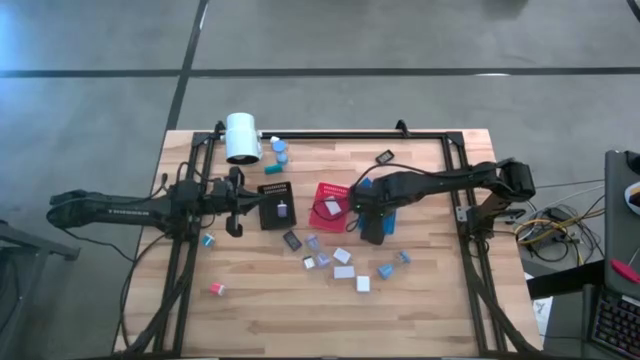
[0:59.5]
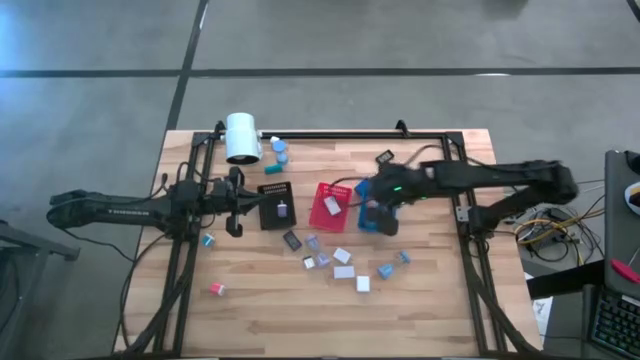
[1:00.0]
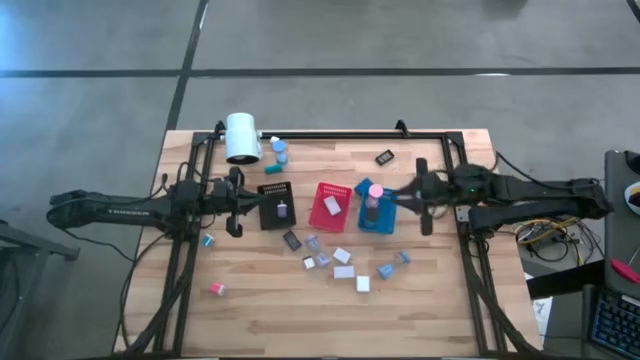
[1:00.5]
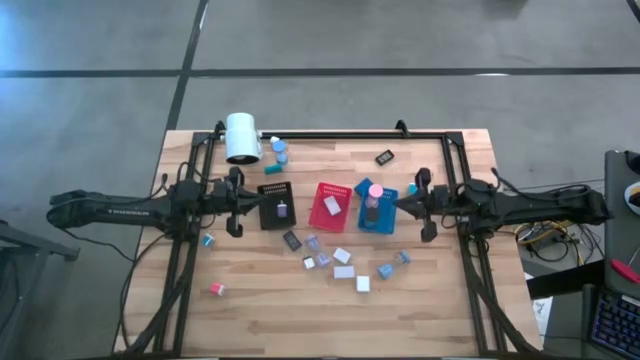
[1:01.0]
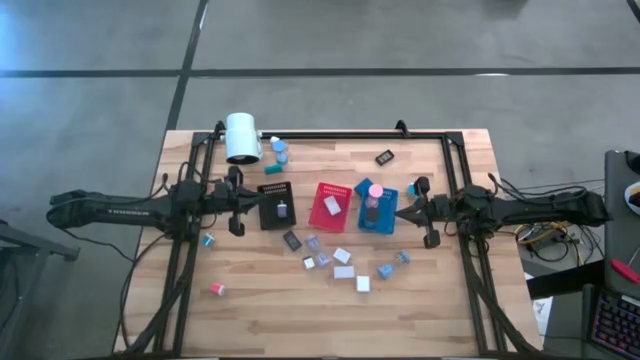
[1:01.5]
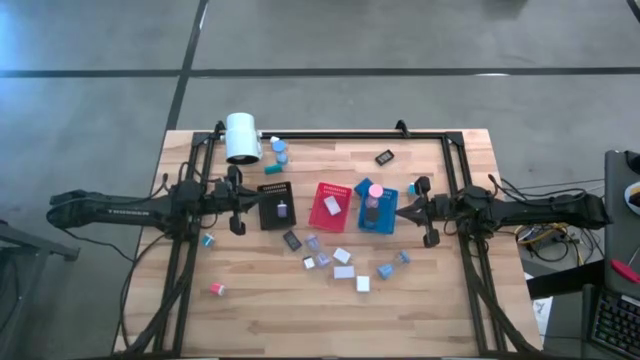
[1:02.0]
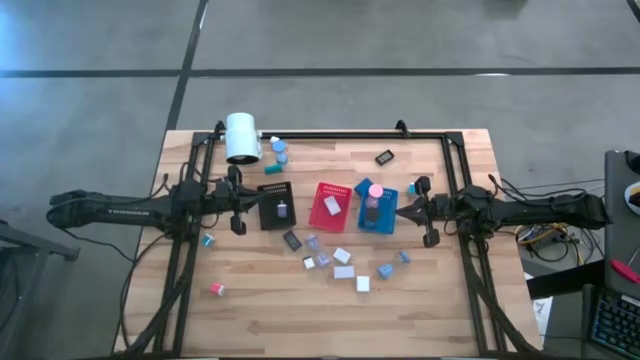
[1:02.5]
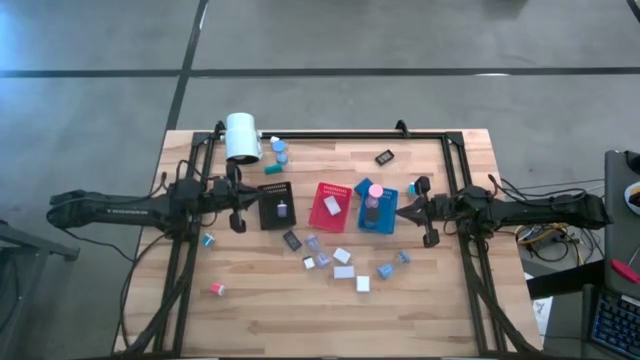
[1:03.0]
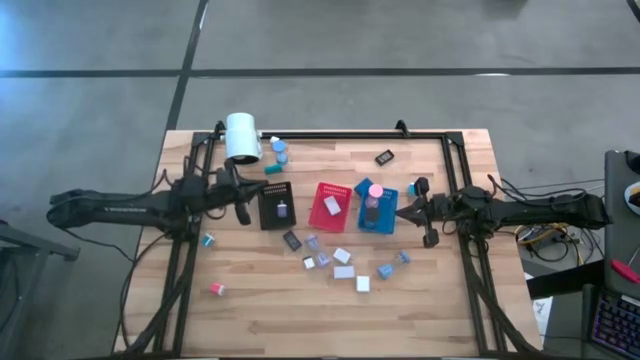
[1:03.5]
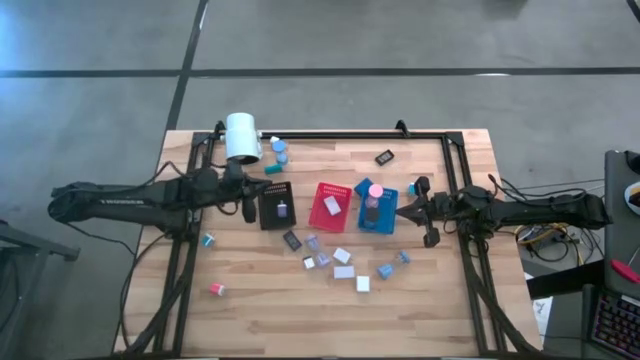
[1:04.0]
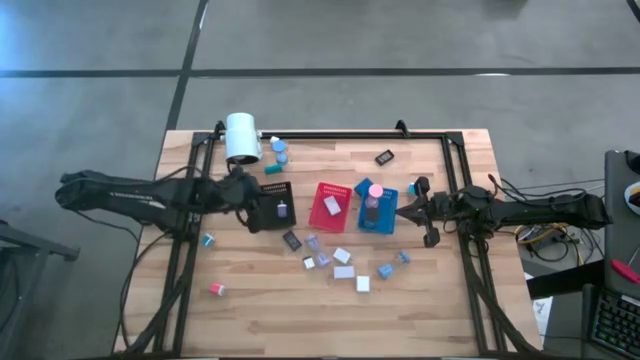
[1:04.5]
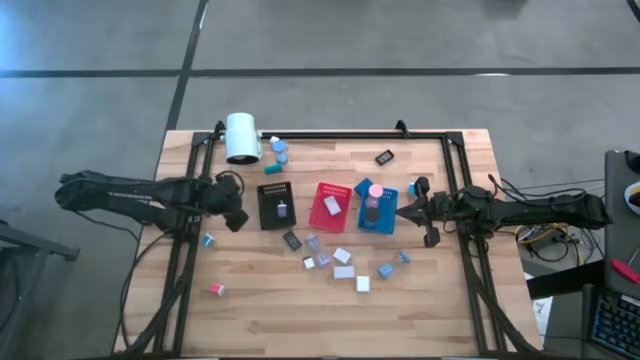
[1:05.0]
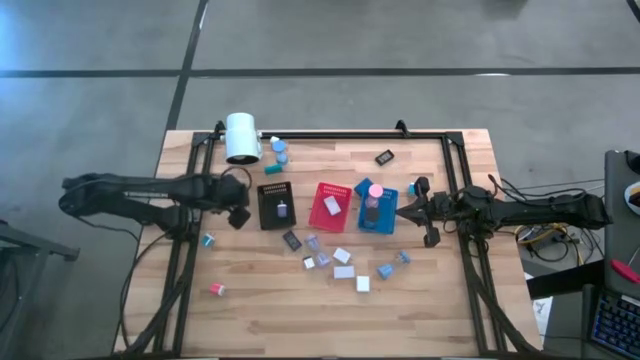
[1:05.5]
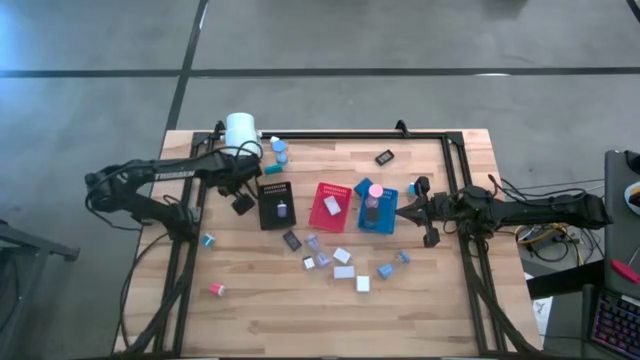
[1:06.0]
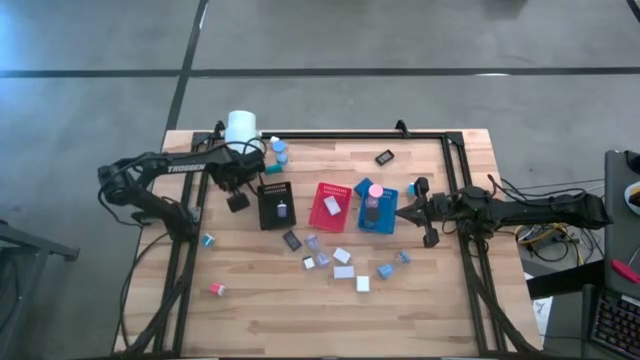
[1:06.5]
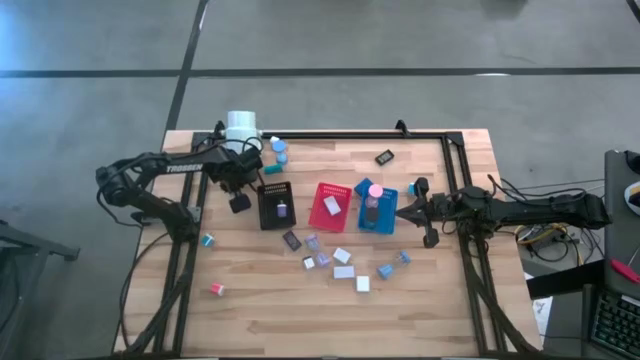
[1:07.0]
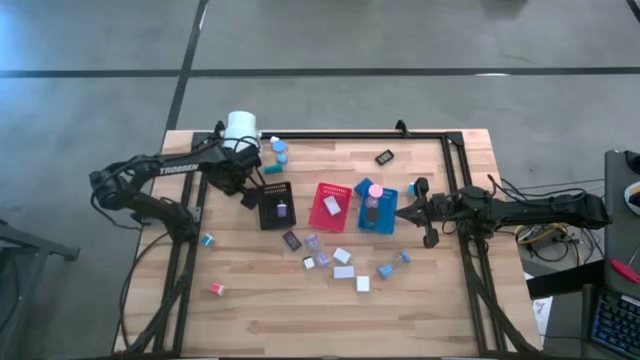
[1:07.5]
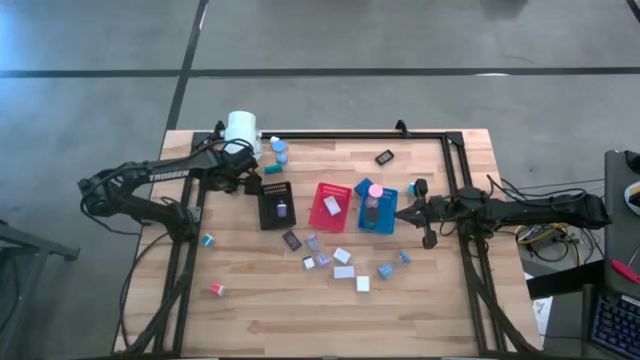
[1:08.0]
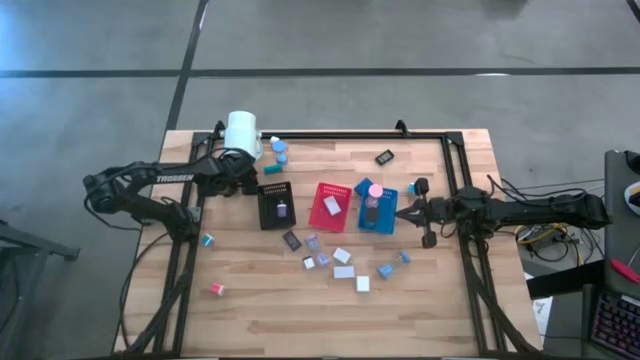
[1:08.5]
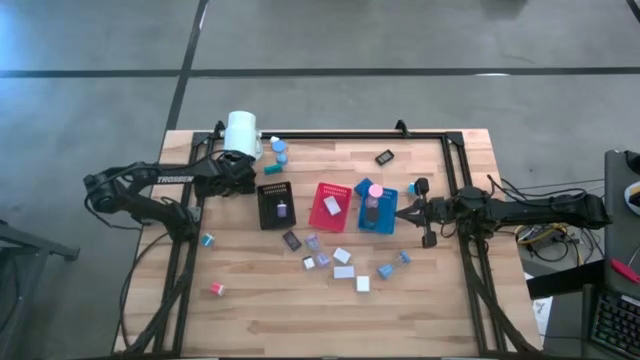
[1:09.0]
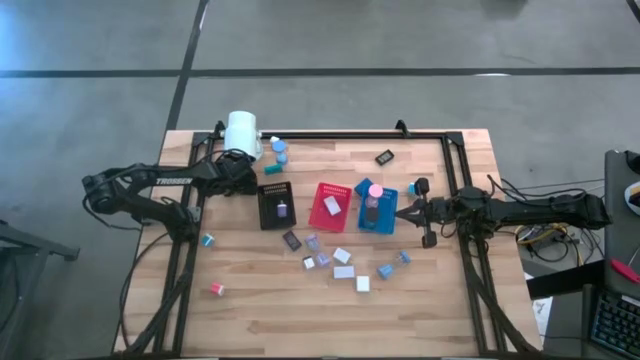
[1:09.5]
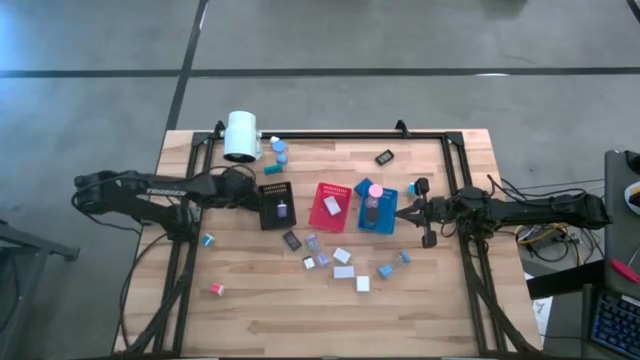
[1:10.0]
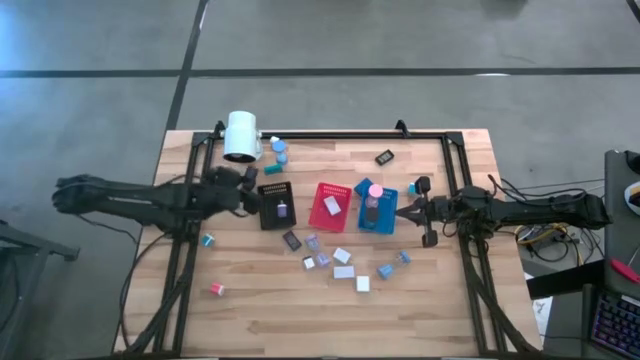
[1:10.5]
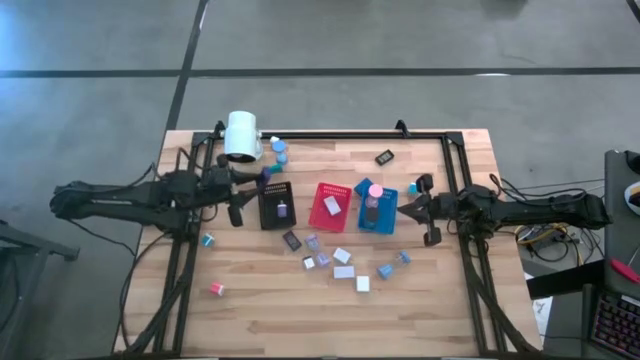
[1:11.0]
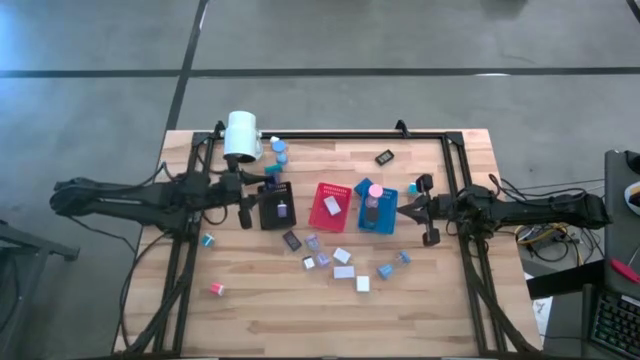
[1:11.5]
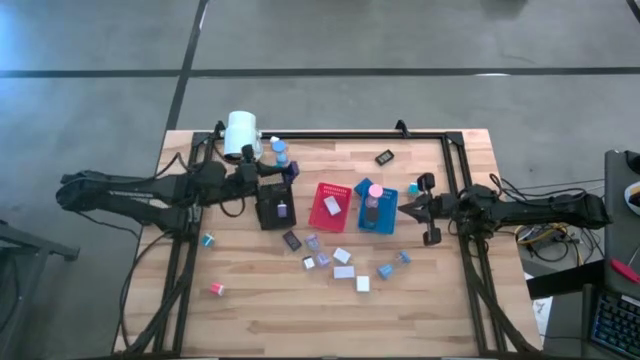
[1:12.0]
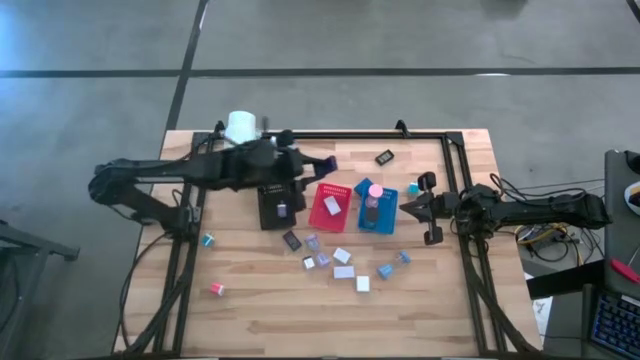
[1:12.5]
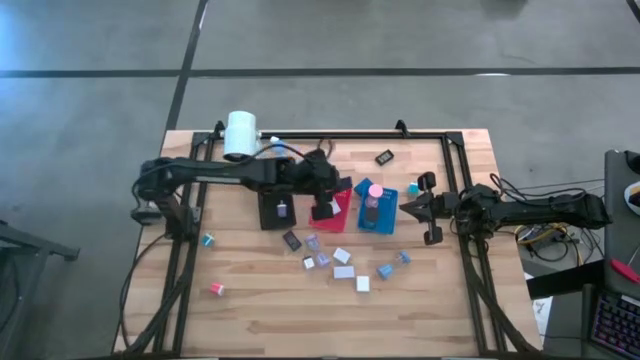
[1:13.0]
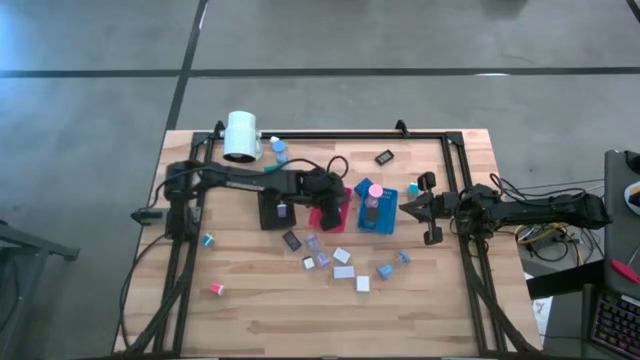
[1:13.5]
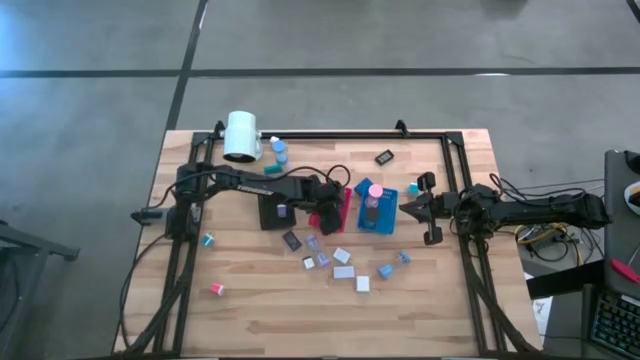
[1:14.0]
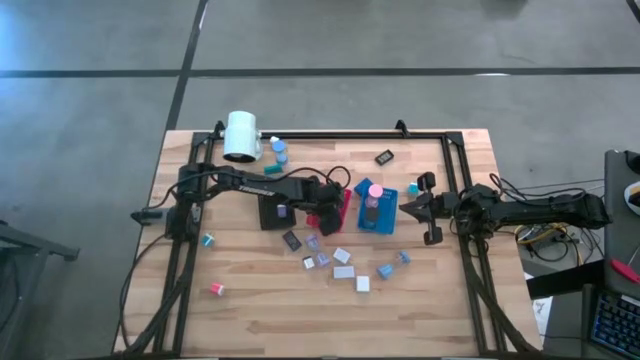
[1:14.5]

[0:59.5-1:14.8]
Task: Pick & Place Office items
Put the top left blue digital clock into the red bin
